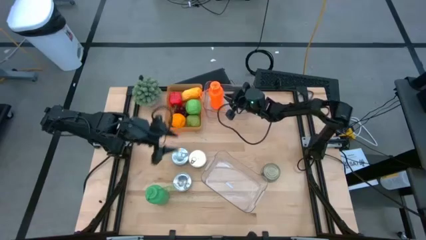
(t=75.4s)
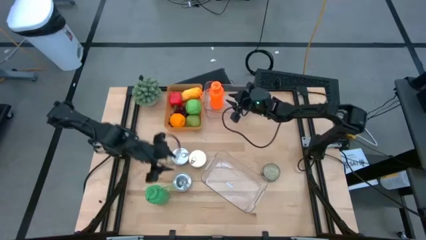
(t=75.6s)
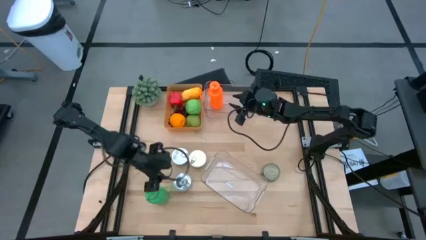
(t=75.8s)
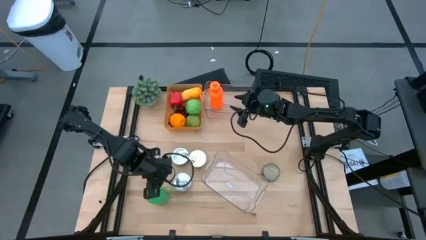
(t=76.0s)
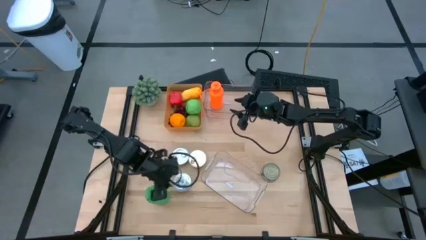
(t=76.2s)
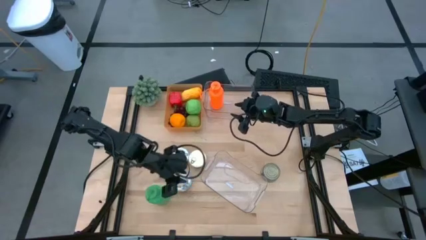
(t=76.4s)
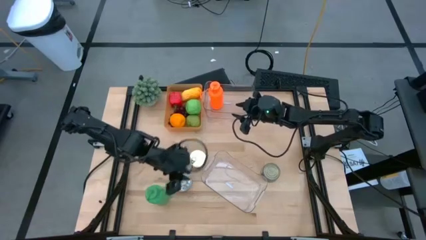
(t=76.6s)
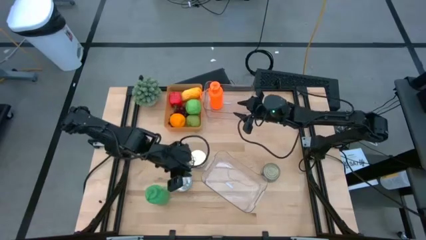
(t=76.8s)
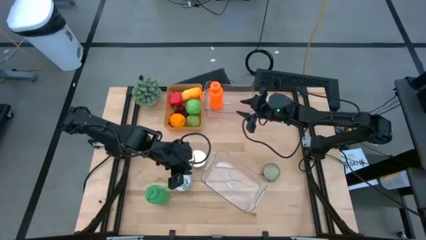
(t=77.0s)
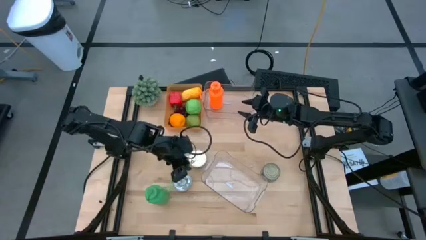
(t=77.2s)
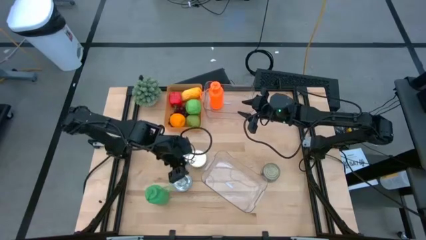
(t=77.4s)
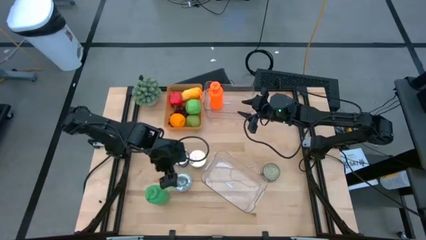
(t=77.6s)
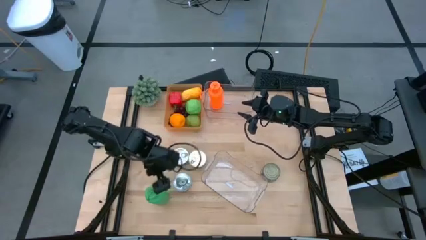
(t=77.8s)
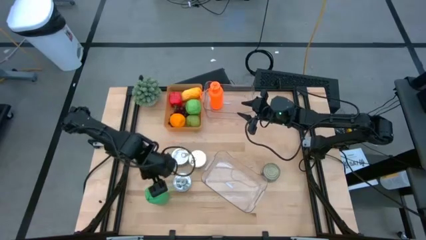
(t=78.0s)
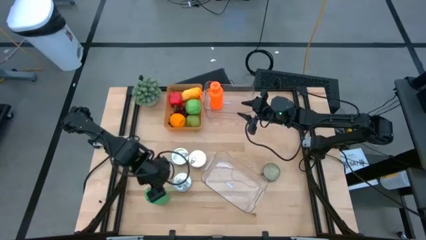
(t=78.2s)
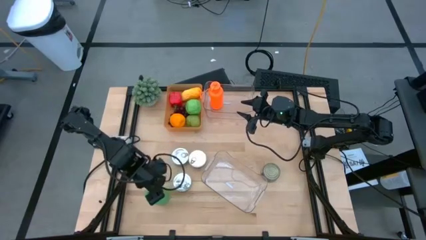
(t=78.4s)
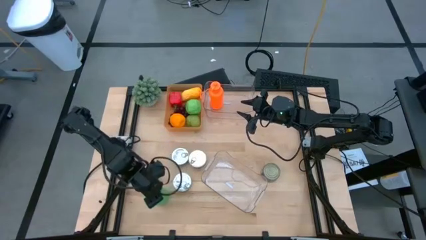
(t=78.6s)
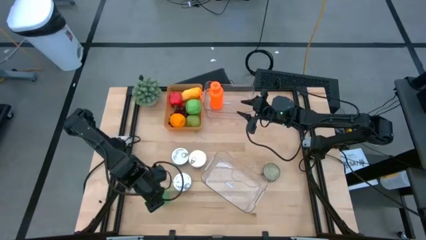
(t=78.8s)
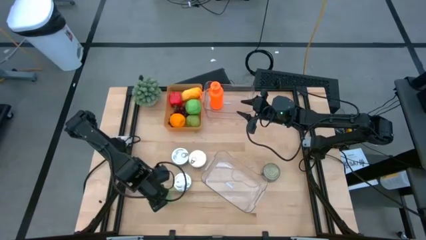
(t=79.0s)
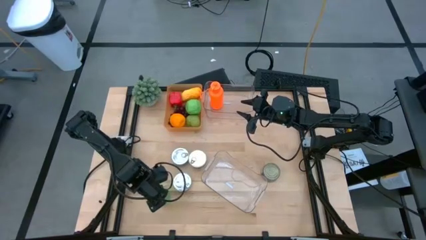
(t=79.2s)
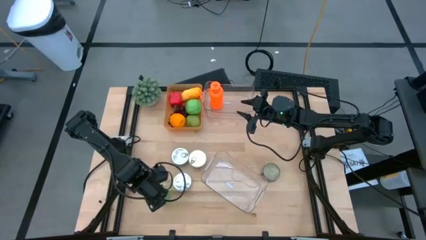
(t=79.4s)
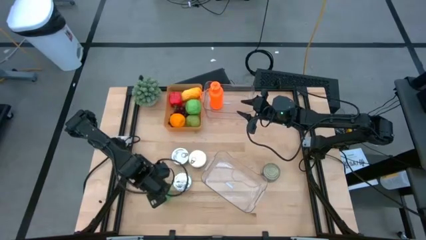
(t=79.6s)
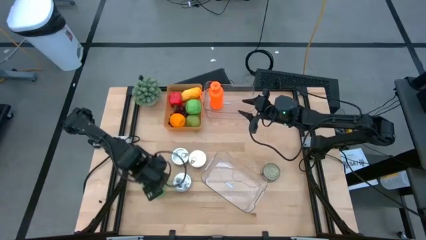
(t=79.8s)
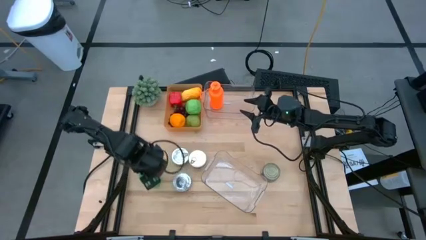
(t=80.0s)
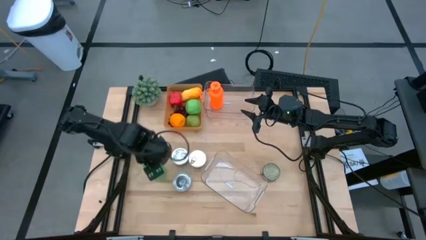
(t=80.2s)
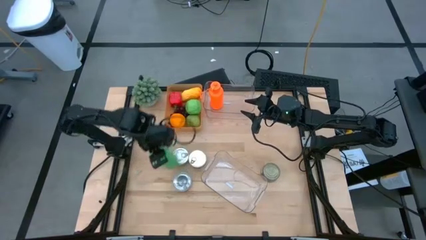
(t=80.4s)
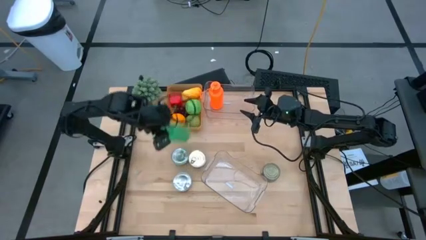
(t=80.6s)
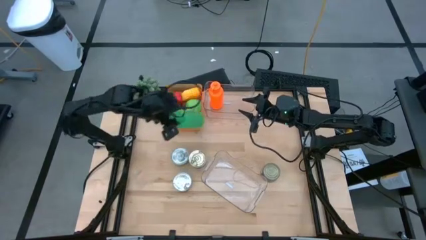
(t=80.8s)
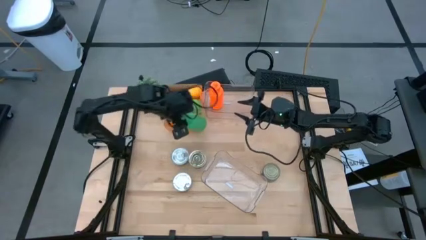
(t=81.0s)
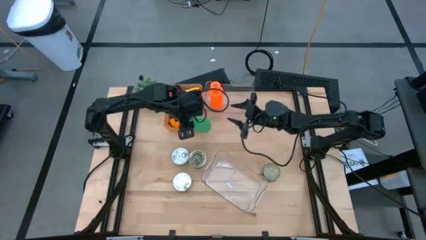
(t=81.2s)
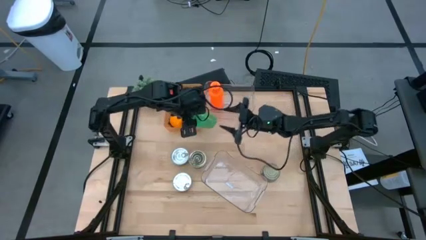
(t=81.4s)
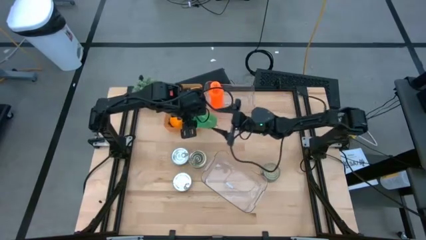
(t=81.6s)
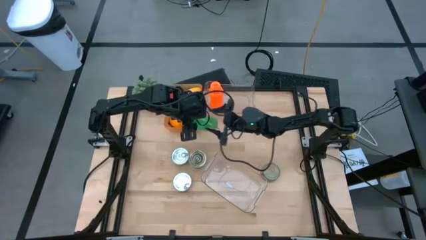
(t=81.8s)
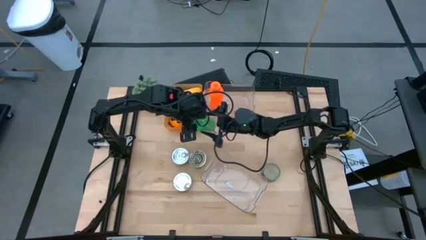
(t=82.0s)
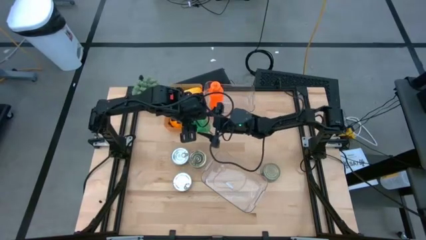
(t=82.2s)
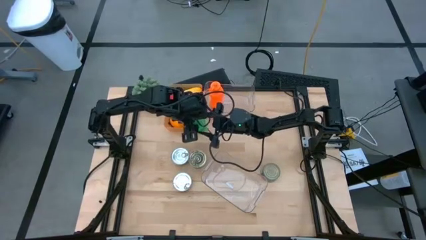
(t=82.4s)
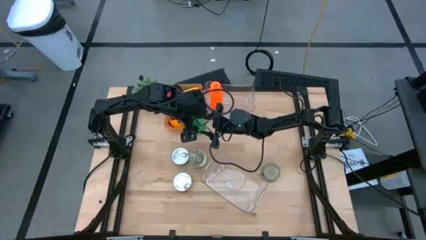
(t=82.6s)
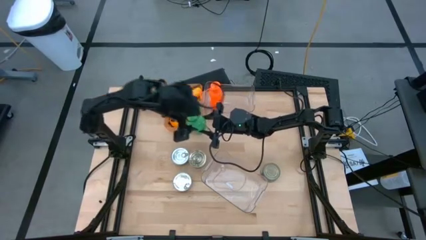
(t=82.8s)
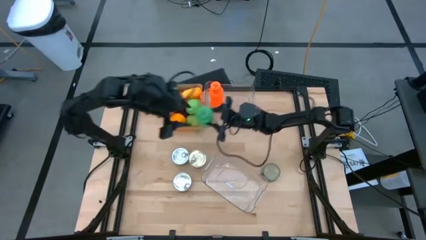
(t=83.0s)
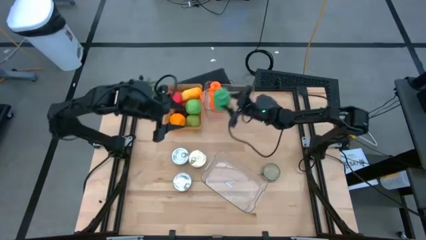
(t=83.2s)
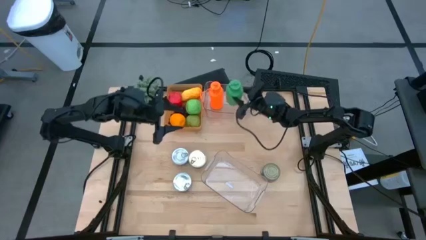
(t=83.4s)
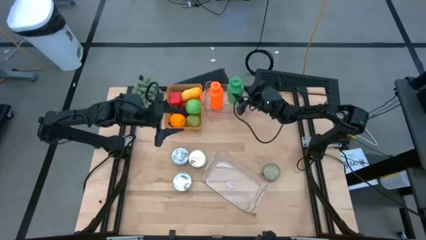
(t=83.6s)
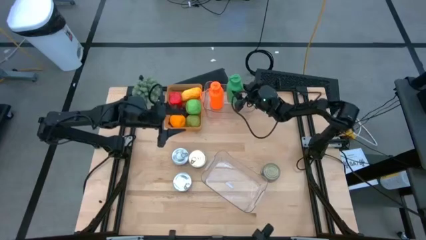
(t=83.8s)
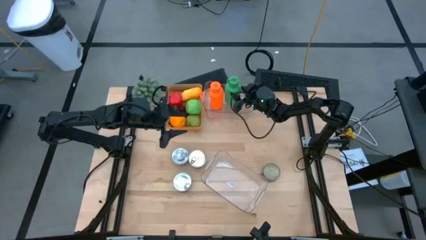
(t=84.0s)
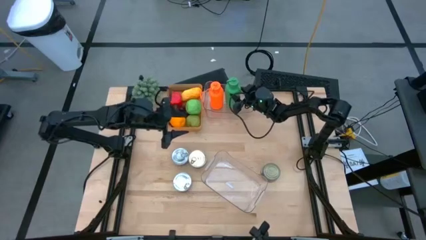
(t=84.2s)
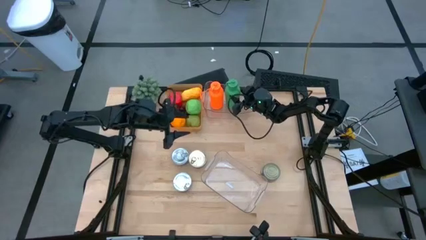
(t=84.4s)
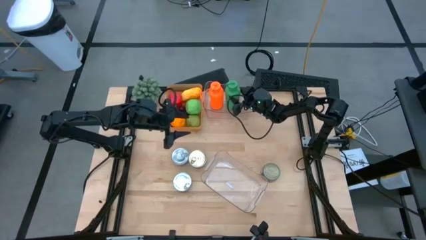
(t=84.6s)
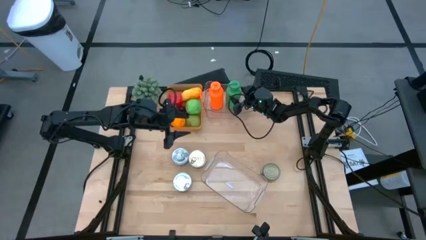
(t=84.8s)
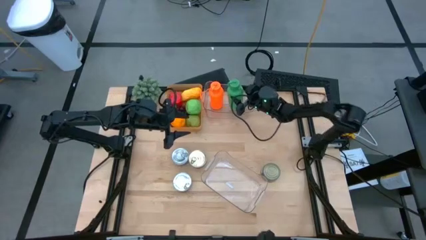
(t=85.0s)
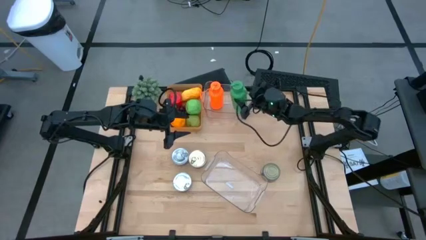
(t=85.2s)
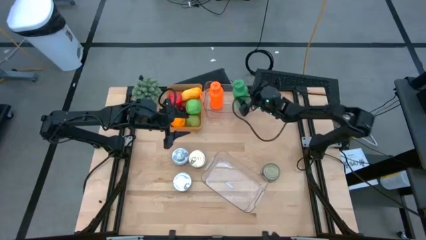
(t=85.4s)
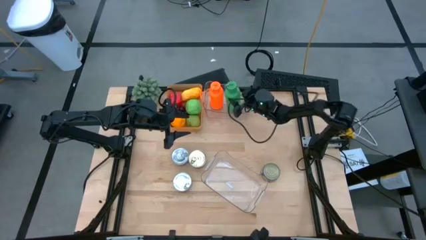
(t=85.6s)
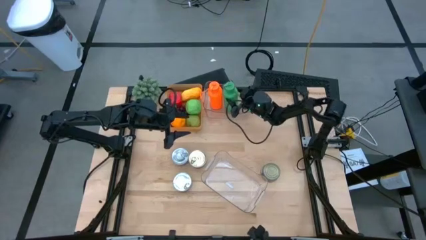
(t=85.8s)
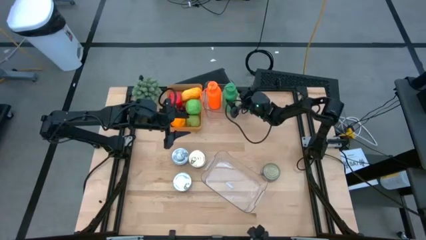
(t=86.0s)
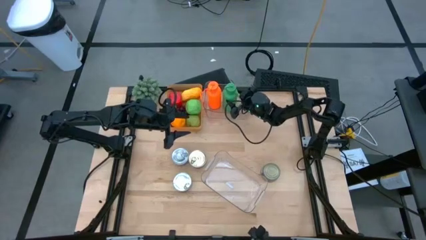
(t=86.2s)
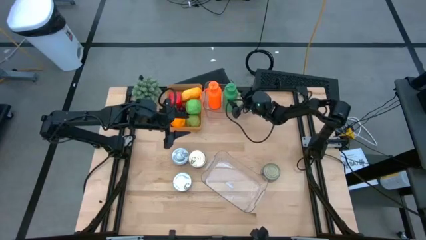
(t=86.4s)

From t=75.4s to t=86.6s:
Task: Pick & Place Food Item
Put the green water bottle into the top transparent bin
